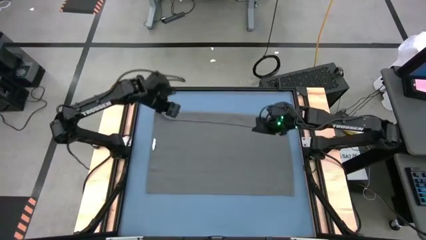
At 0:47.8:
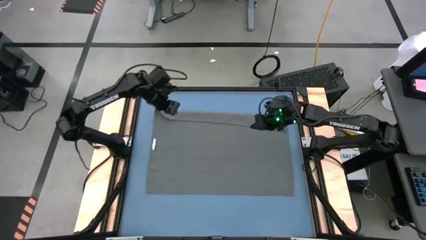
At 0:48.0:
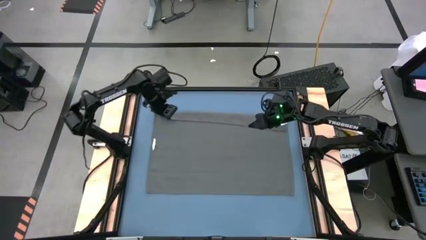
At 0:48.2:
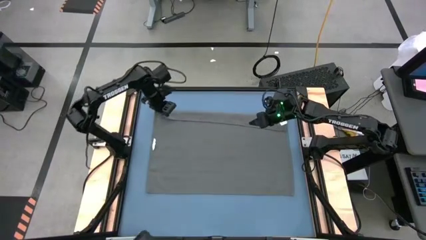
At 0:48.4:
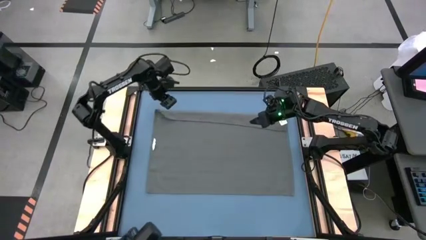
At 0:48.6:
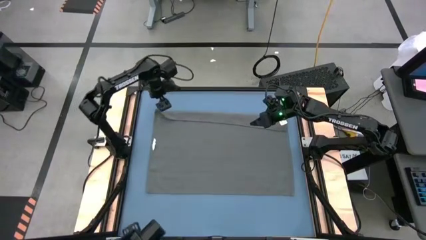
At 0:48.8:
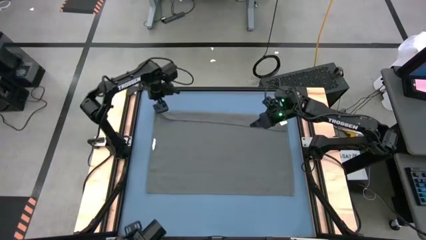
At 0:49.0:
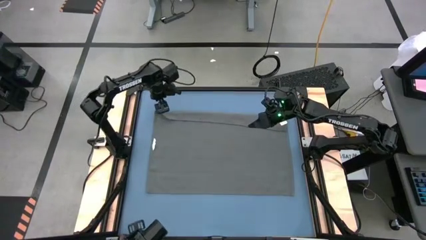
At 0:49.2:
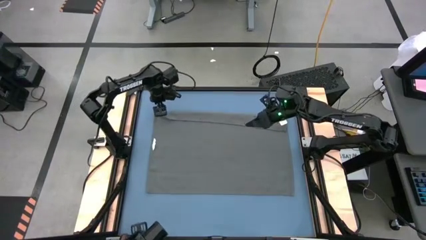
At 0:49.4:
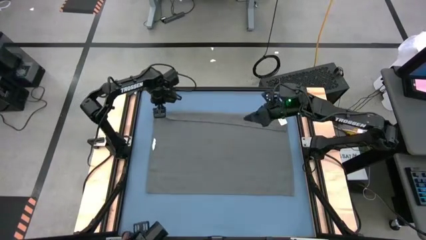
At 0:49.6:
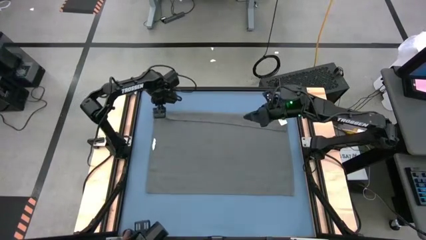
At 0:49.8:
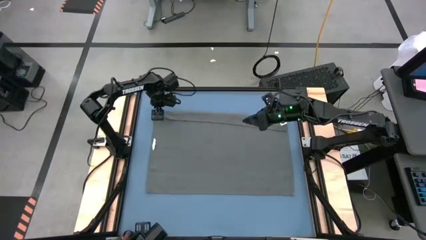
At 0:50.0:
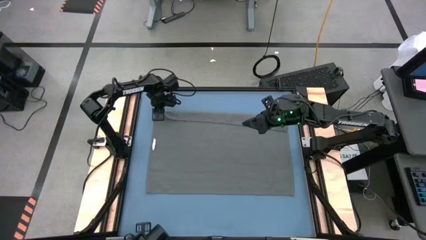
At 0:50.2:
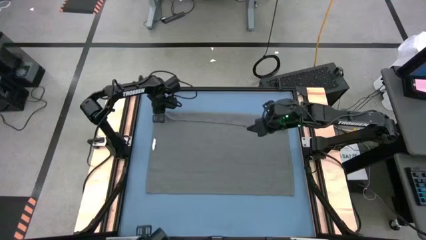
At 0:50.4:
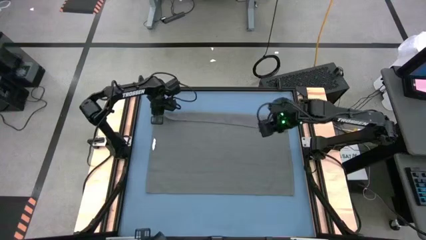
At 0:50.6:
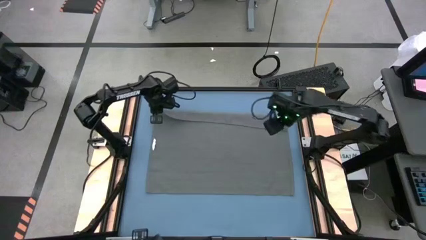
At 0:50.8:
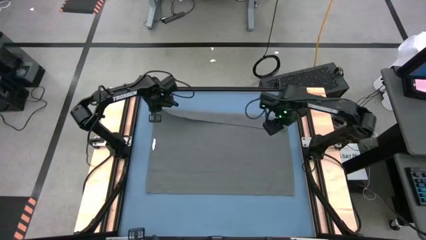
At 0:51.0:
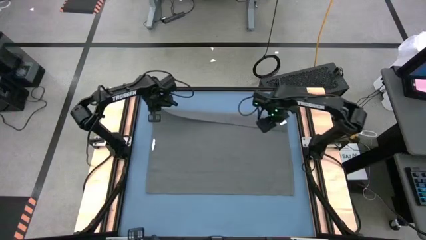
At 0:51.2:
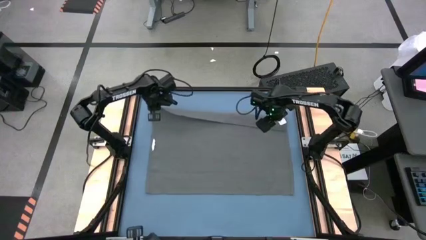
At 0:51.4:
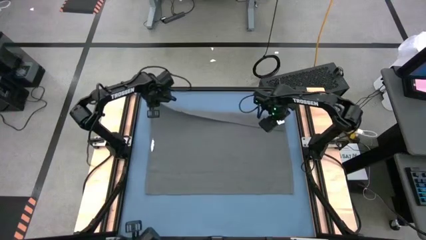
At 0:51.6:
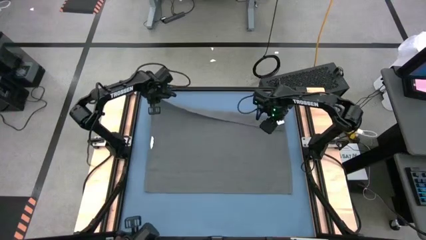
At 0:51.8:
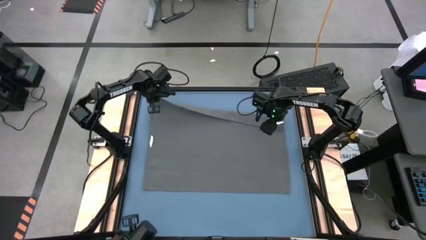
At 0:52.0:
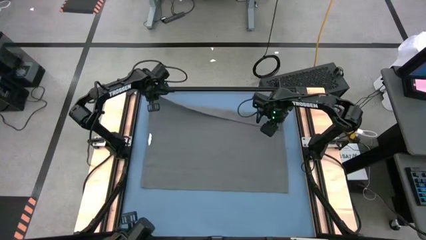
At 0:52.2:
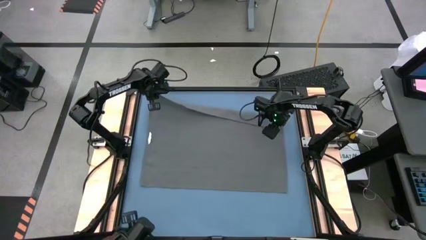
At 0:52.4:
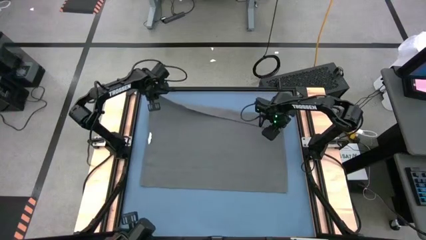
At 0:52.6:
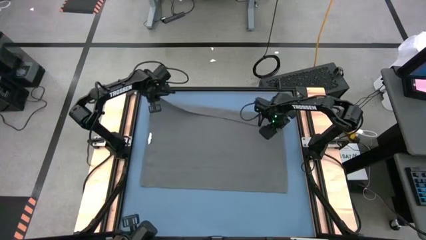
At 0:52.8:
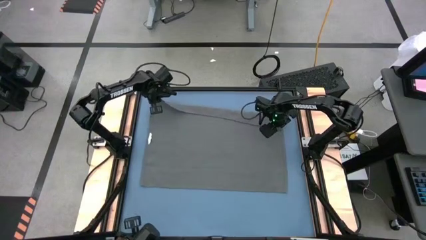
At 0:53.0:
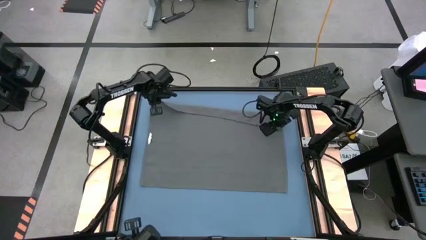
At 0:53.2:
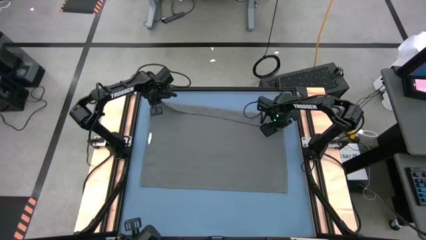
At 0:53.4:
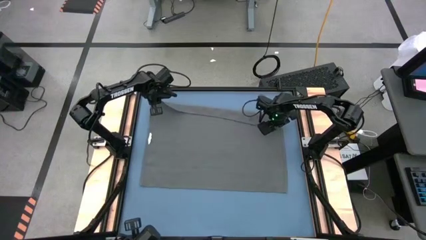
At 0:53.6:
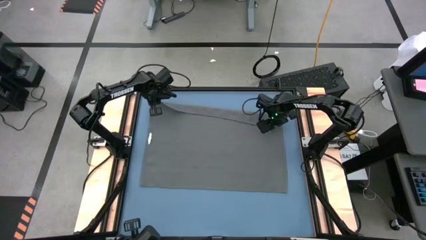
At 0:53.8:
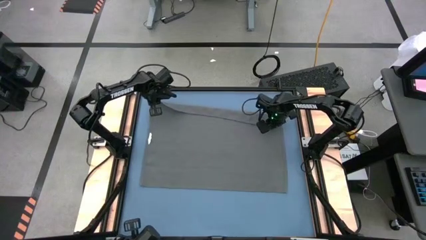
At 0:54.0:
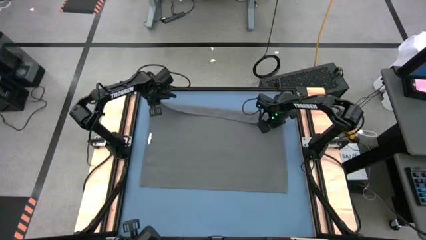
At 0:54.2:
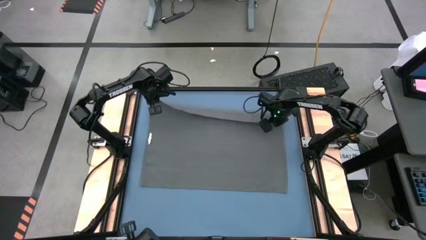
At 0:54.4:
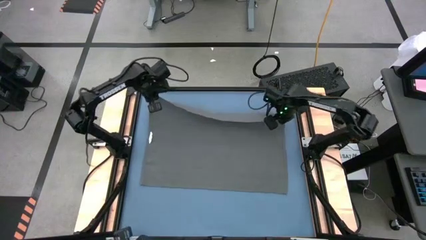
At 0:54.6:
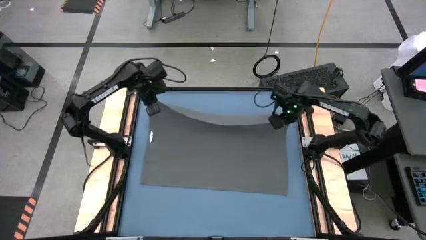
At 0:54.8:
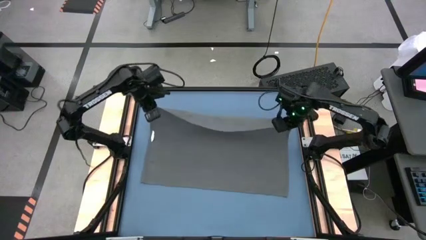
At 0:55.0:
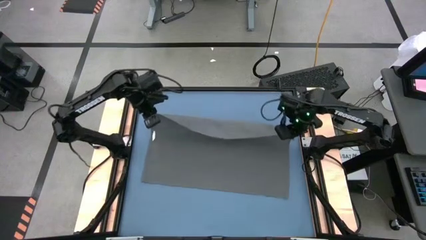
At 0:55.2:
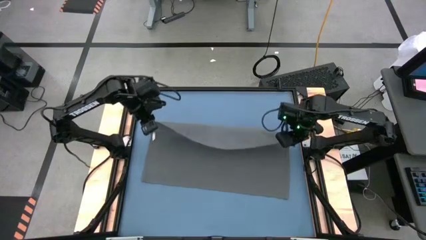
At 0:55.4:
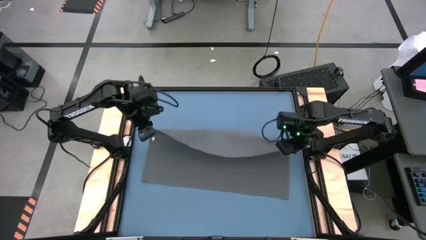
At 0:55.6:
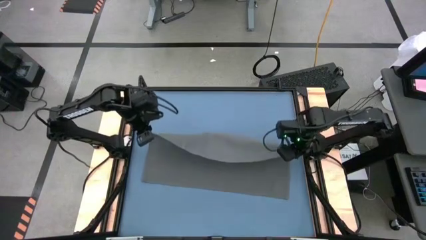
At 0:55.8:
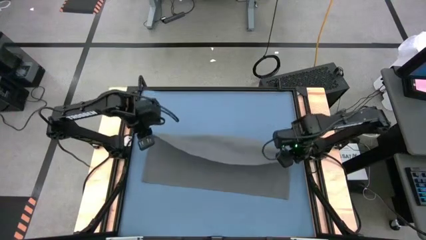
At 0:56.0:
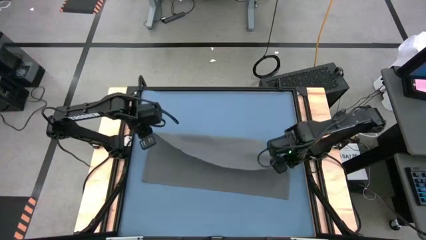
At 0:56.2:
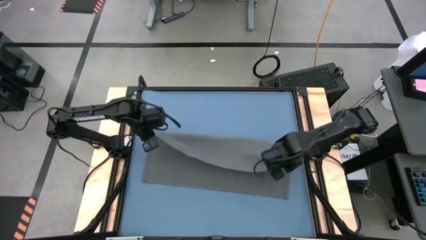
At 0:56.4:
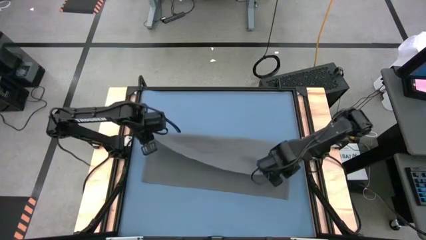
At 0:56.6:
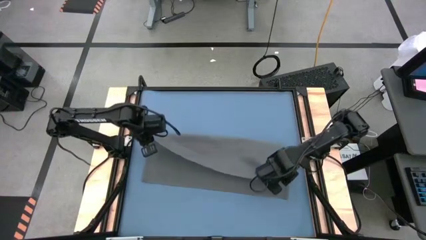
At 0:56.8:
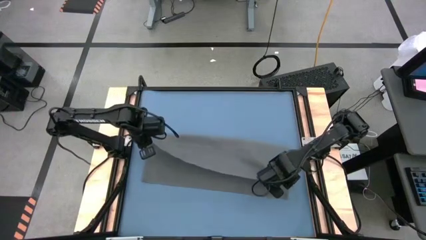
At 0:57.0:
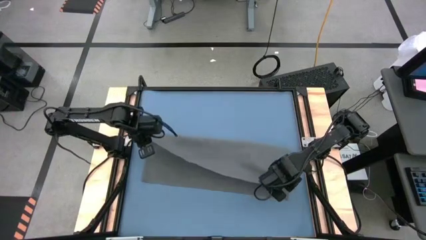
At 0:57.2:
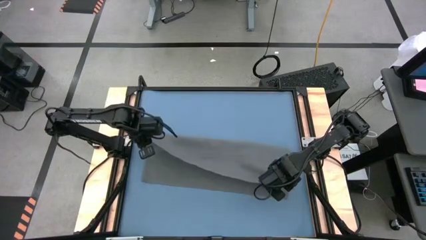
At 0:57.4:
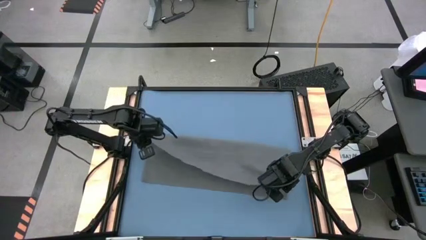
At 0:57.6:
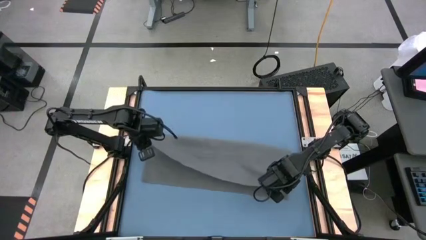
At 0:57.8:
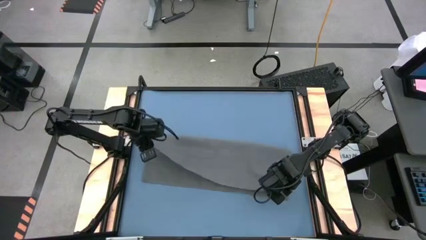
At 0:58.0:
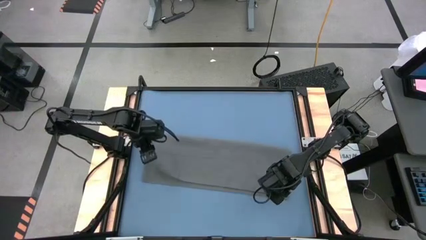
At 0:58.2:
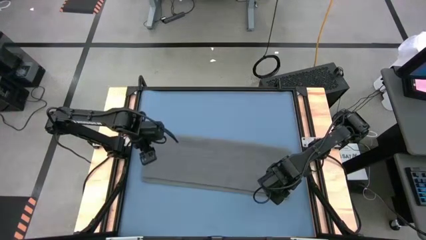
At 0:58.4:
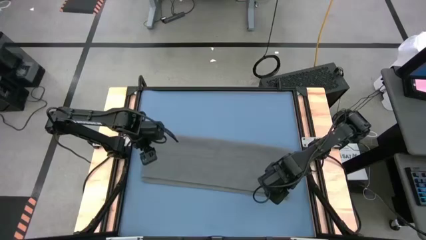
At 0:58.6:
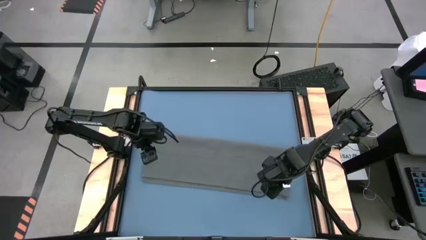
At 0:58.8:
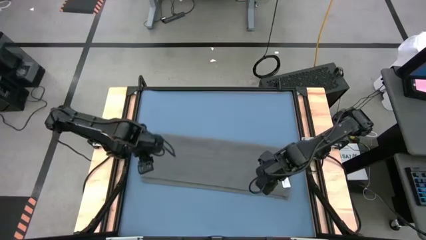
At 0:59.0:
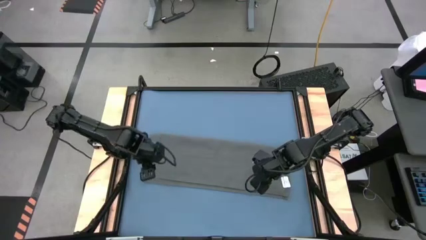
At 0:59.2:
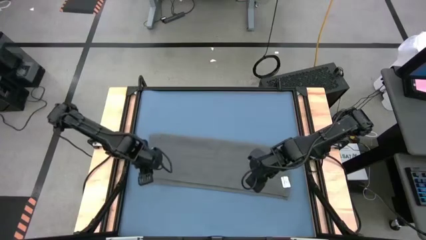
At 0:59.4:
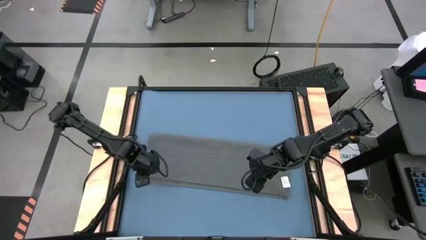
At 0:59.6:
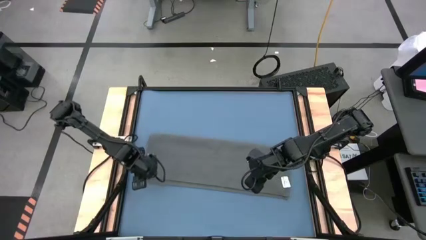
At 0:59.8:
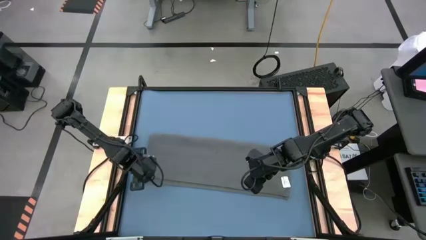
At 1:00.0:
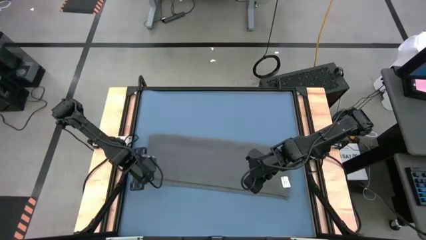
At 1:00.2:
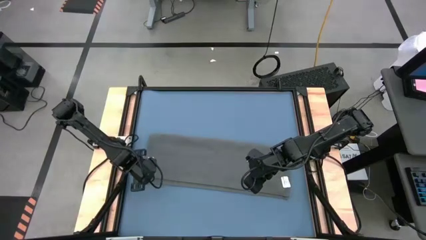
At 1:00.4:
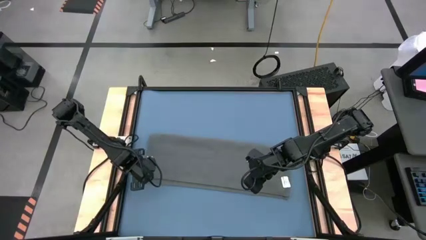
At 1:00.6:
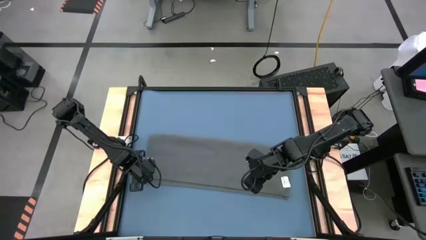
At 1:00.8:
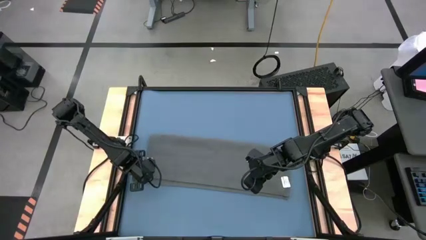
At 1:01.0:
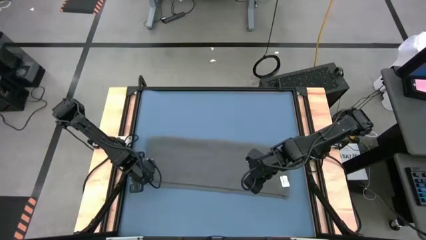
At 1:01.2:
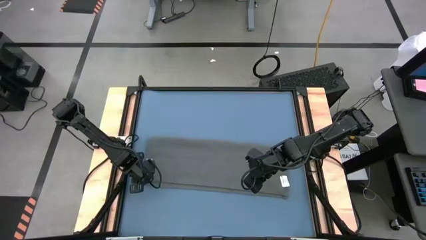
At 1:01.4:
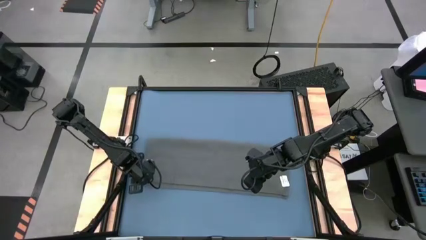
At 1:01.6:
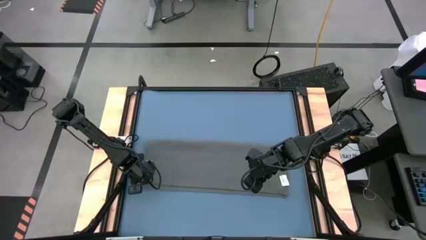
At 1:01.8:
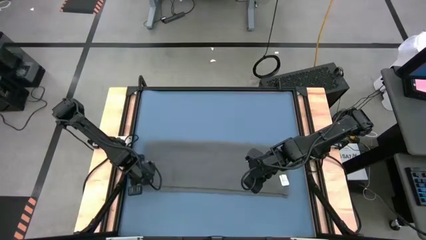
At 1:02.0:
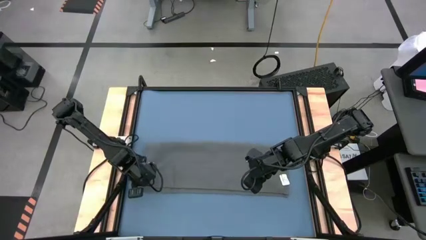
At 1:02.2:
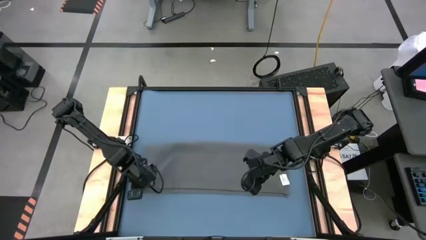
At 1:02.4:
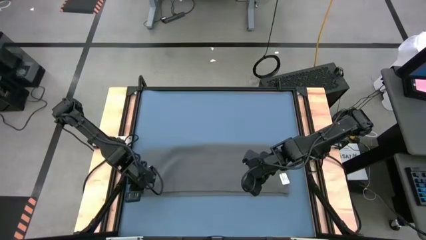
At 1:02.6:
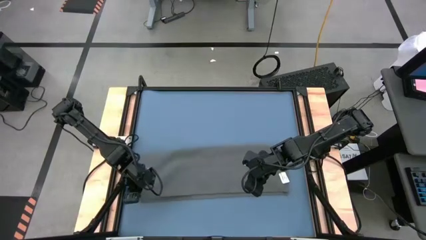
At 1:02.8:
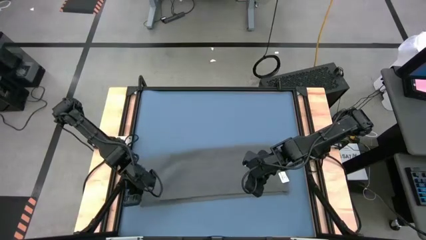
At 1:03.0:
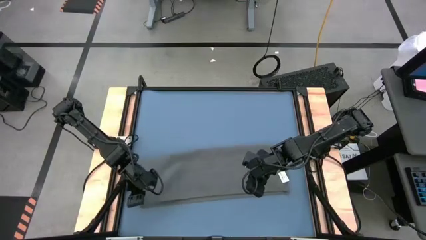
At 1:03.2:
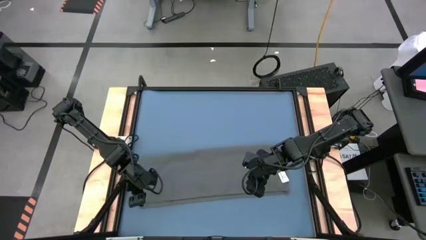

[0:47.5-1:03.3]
Task: Roll towel
Fold the gray towel
